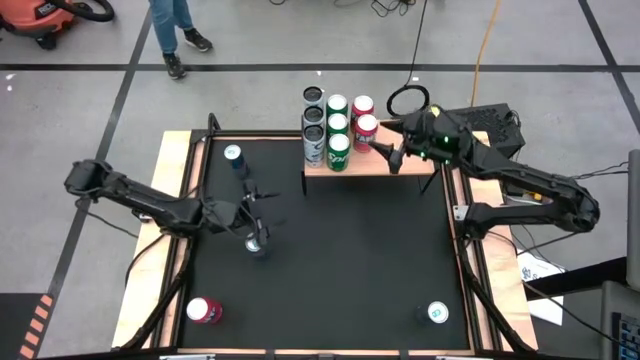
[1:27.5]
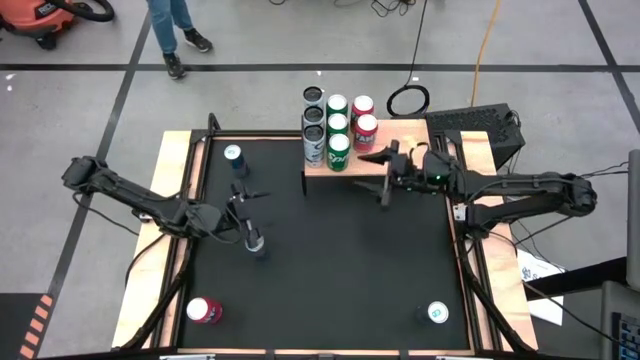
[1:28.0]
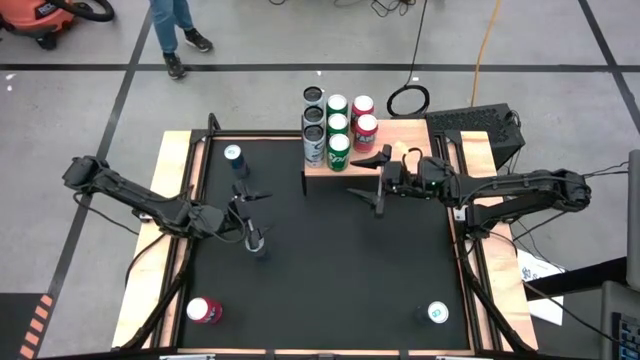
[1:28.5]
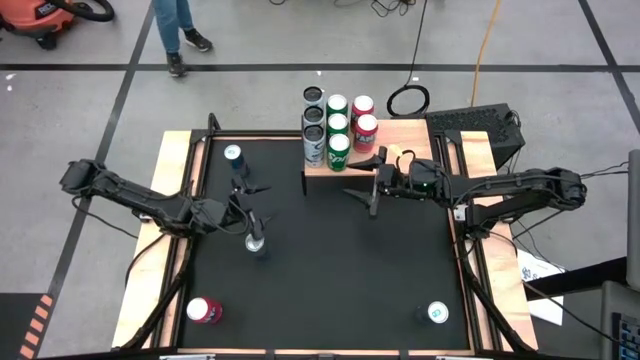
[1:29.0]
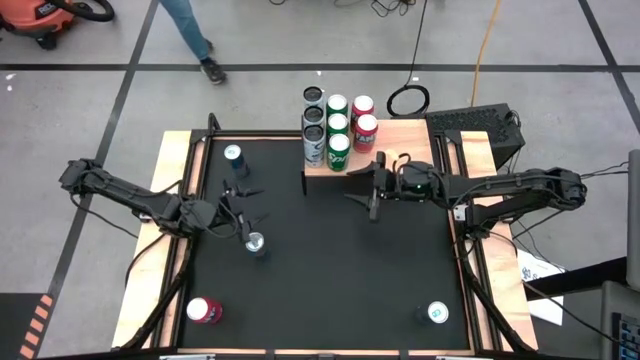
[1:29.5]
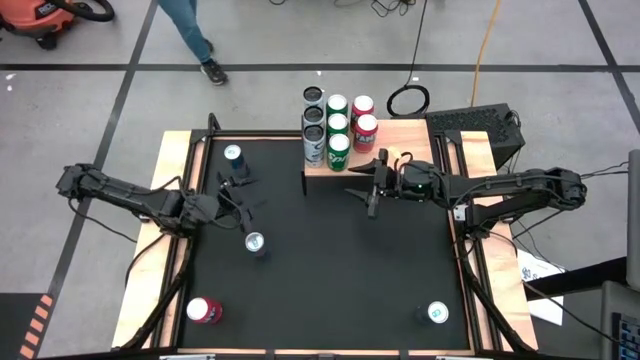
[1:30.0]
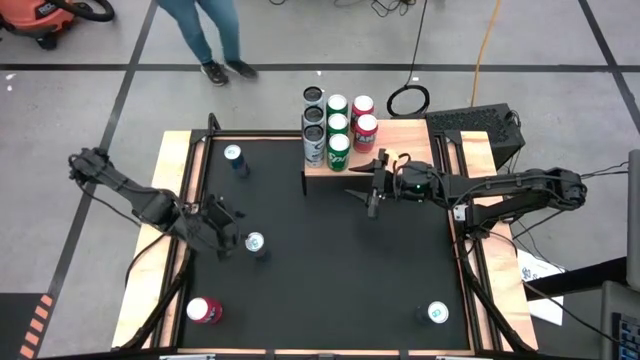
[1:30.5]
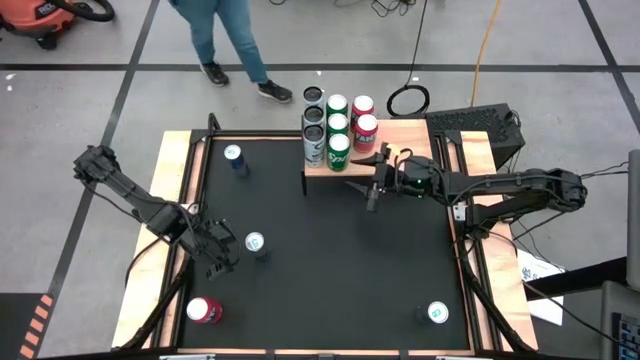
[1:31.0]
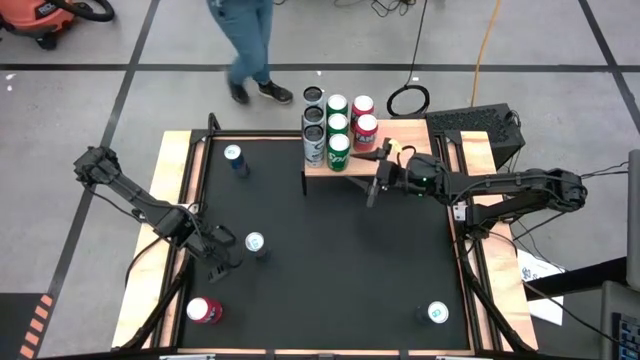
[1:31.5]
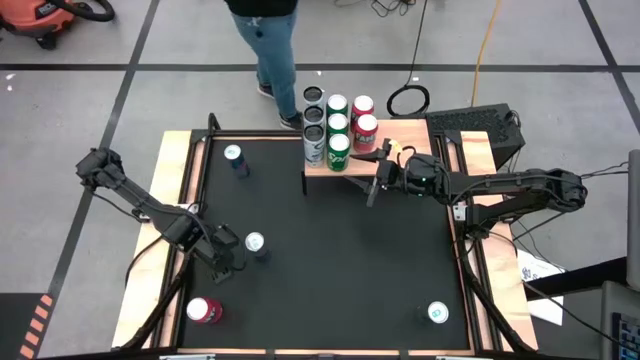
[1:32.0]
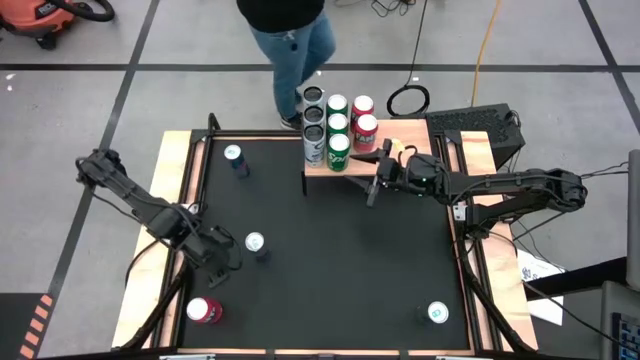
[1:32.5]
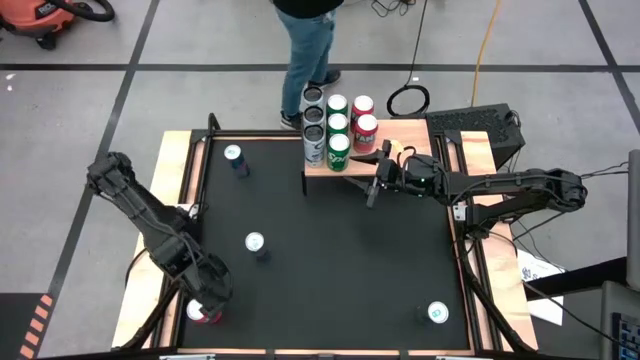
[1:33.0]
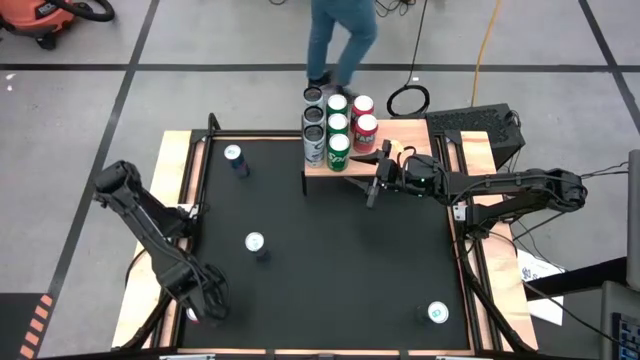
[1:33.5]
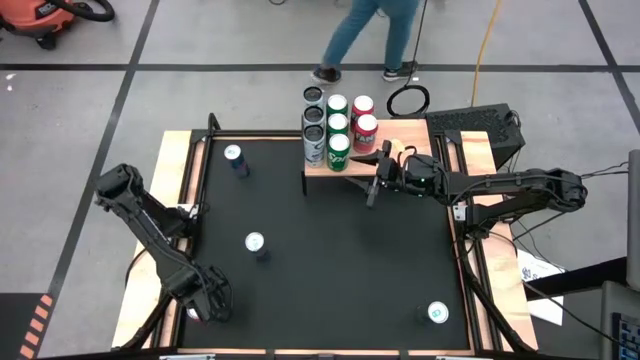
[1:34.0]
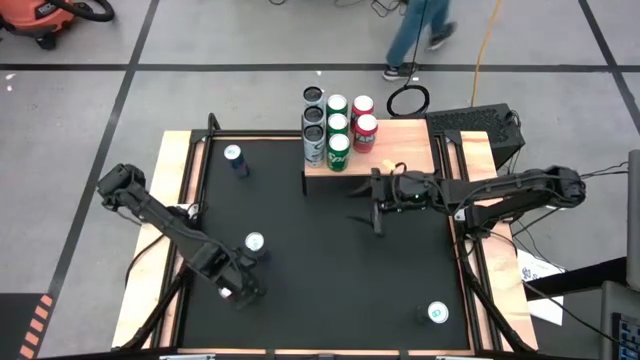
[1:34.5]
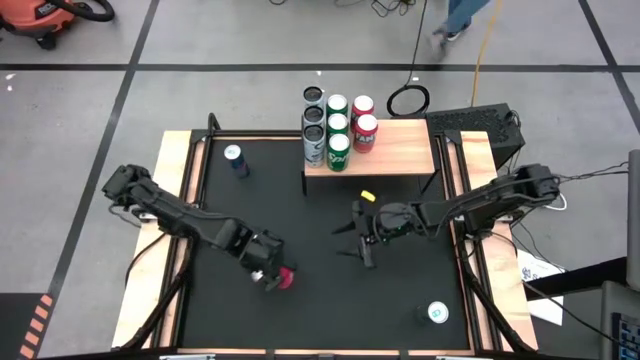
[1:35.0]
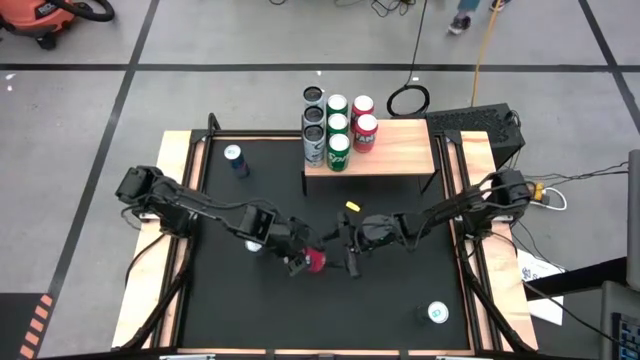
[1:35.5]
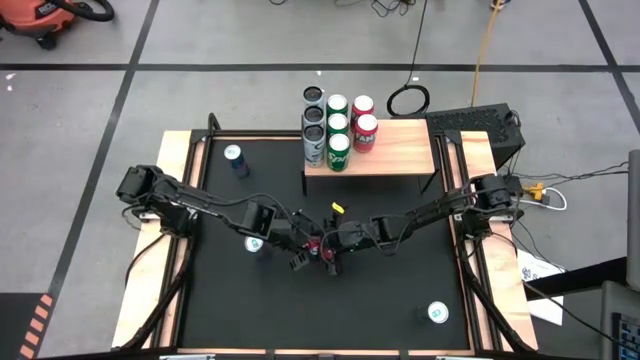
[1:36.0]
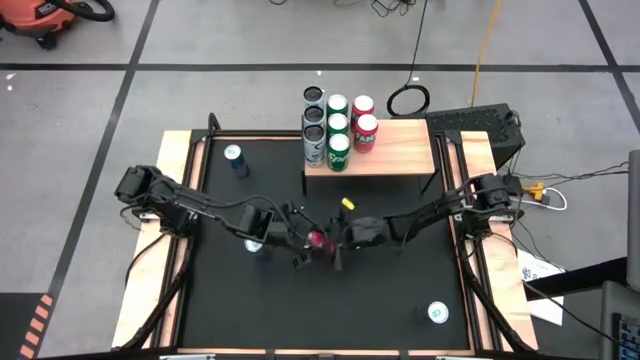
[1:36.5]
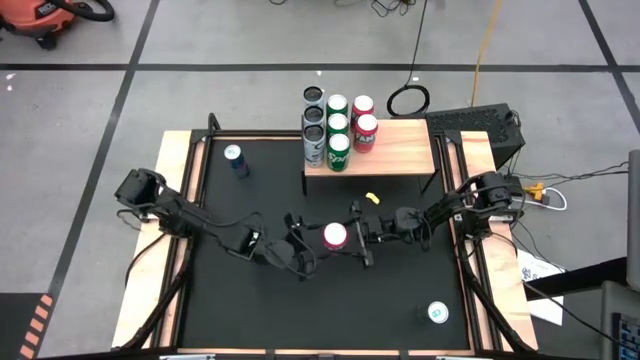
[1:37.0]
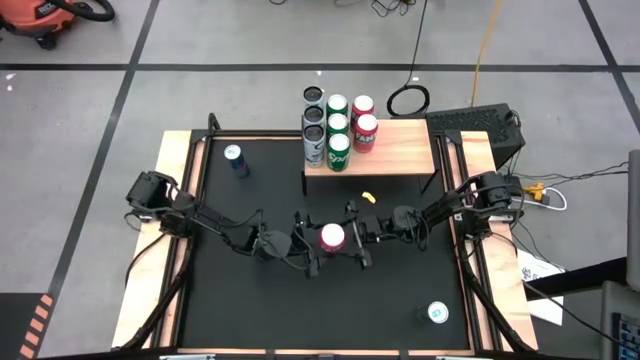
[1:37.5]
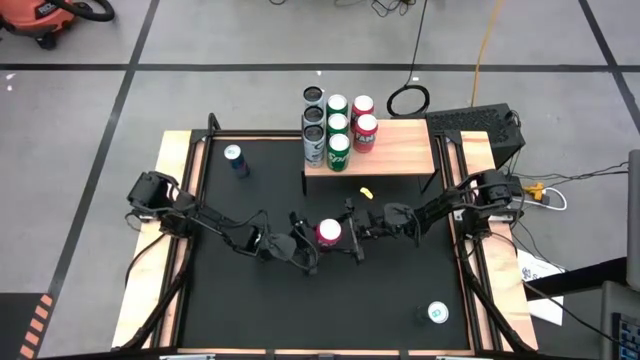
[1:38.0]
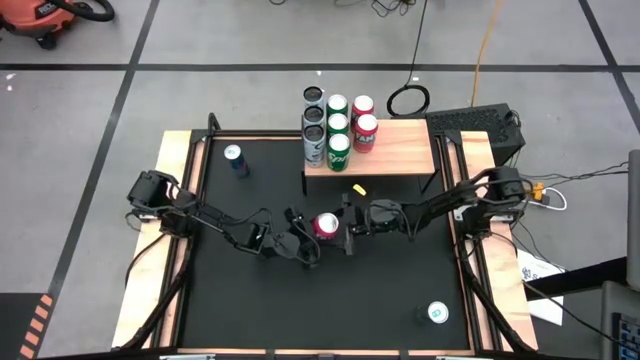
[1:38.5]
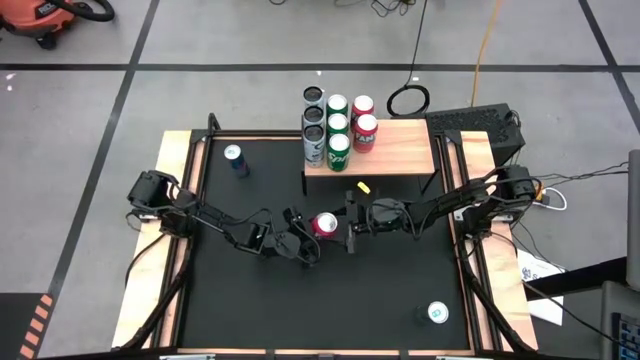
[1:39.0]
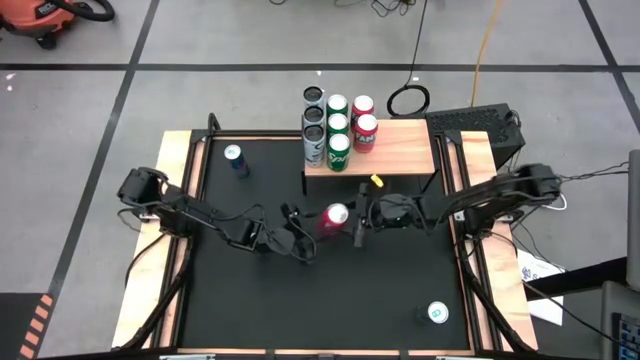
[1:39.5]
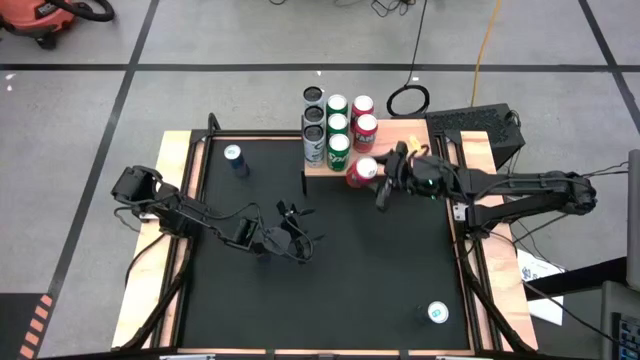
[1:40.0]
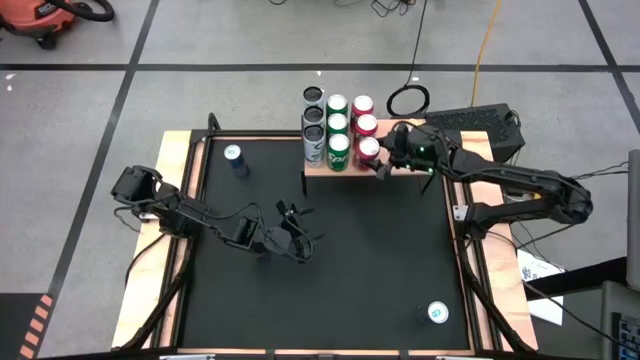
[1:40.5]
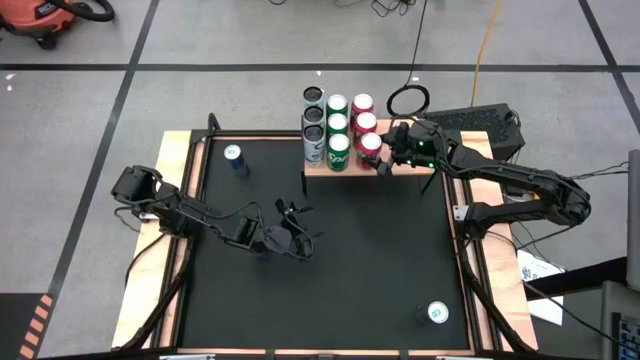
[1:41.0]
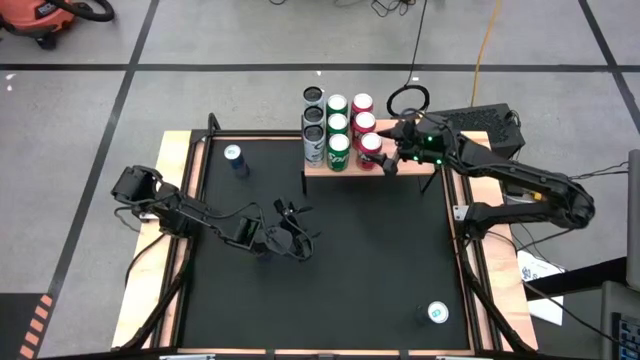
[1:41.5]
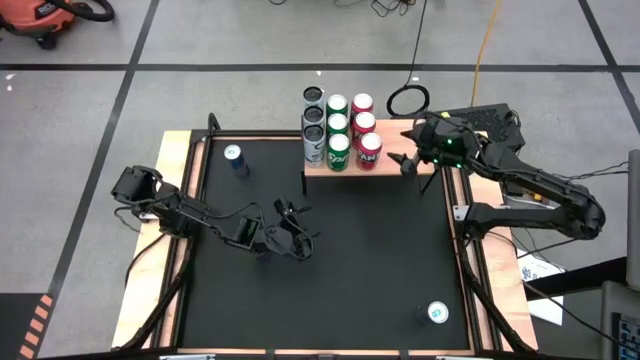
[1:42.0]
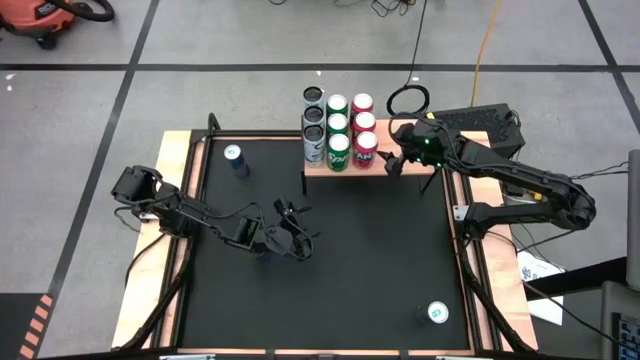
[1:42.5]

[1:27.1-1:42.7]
Task: Place canned beverage on shelf
Put the red soda can on the shelf aligned with the other red soda can

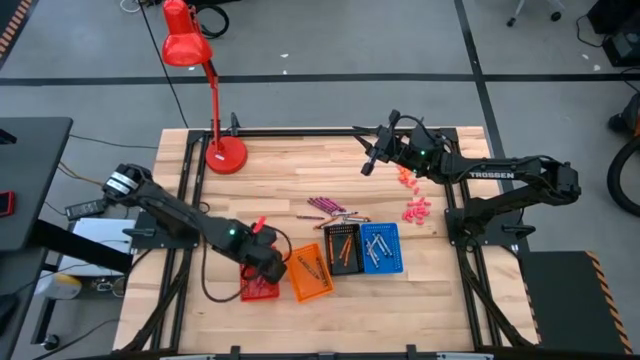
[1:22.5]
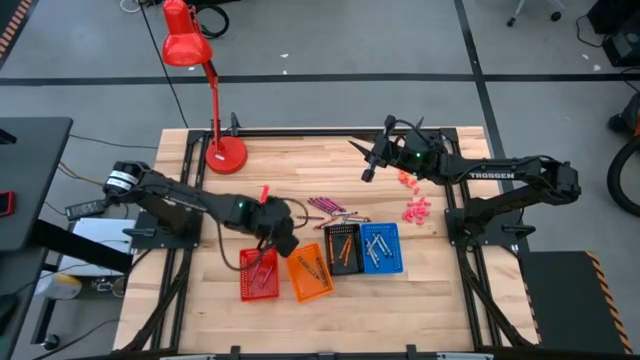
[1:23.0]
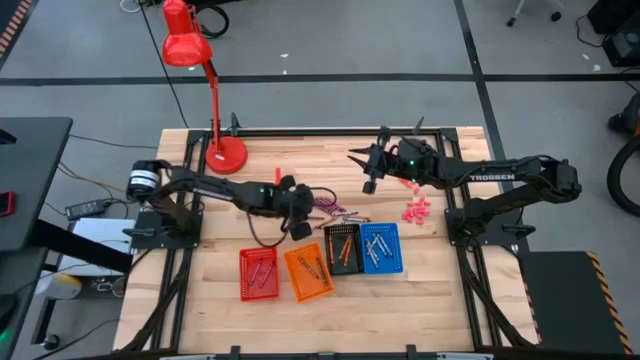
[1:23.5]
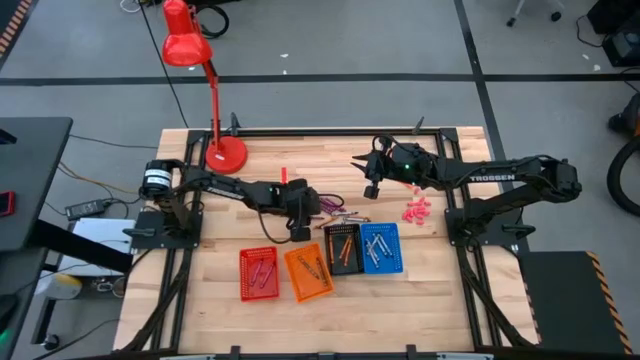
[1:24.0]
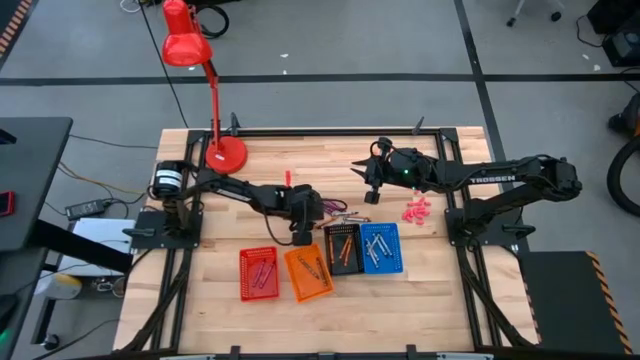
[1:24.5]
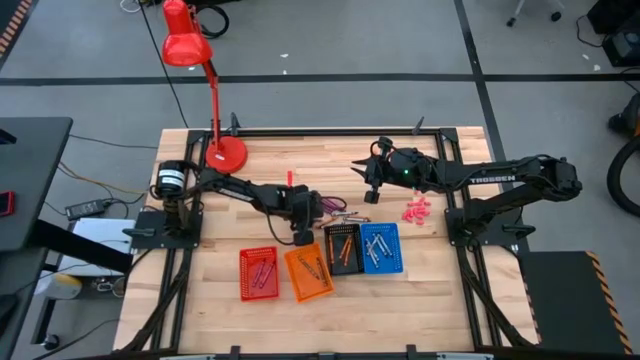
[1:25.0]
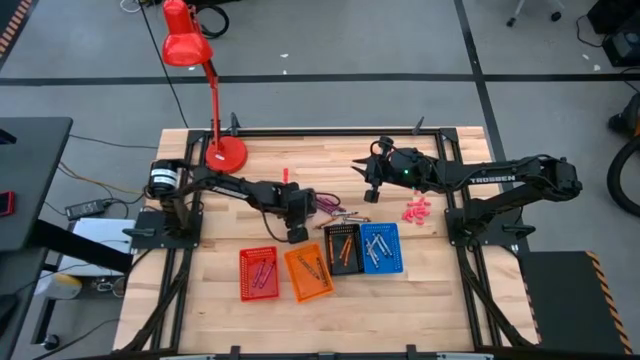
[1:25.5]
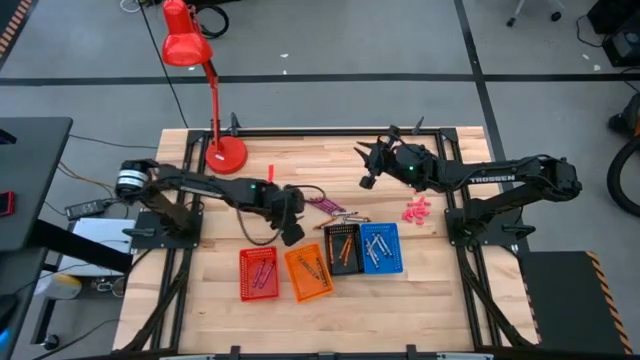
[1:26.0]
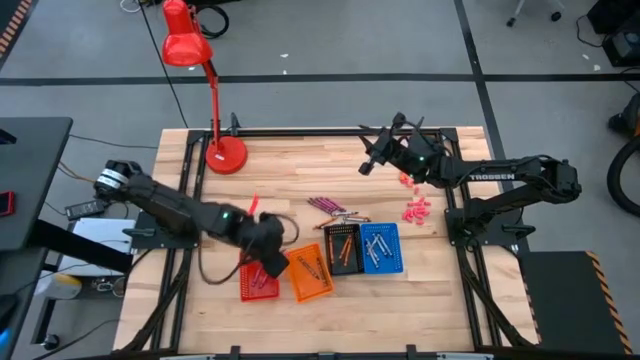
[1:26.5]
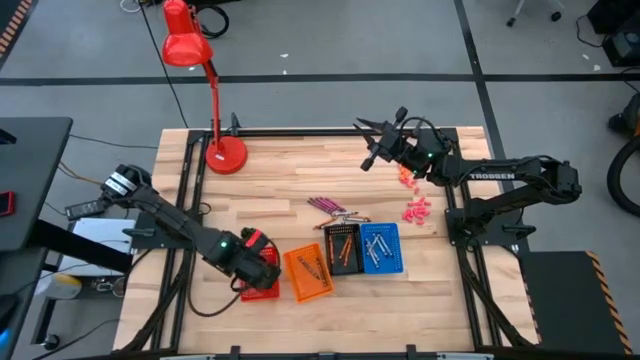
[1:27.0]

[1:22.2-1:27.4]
Task: Sort crayons
Put the pink crayon into the red bin
